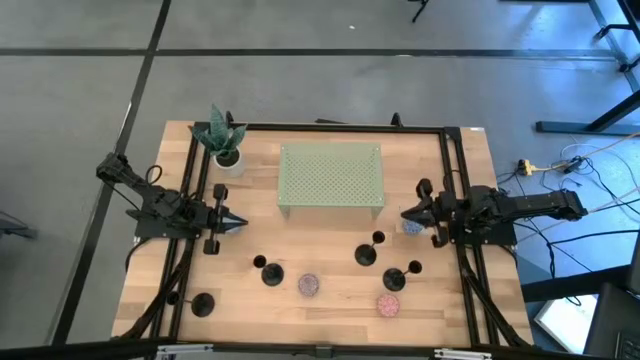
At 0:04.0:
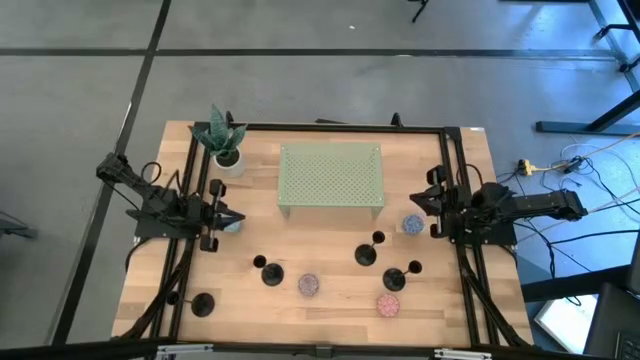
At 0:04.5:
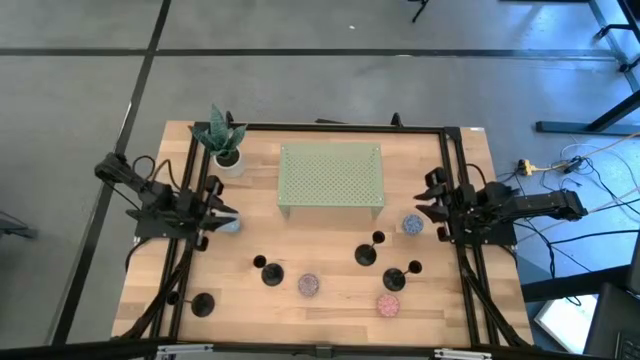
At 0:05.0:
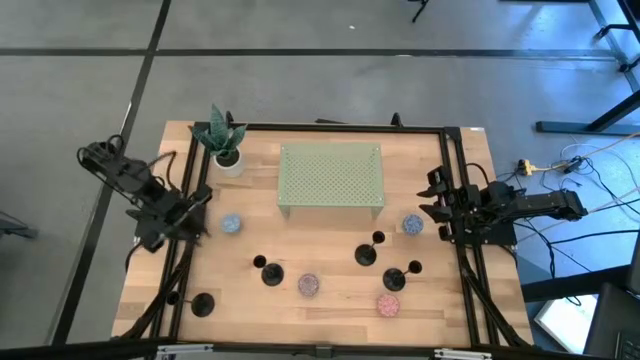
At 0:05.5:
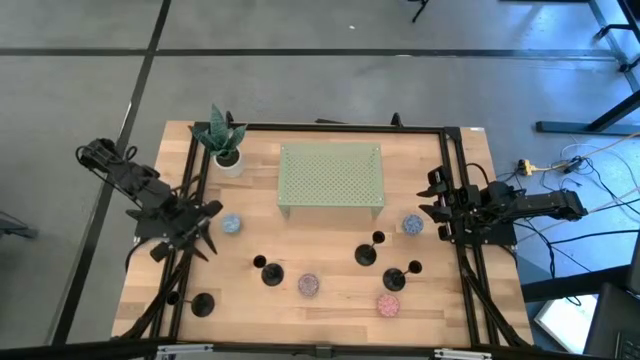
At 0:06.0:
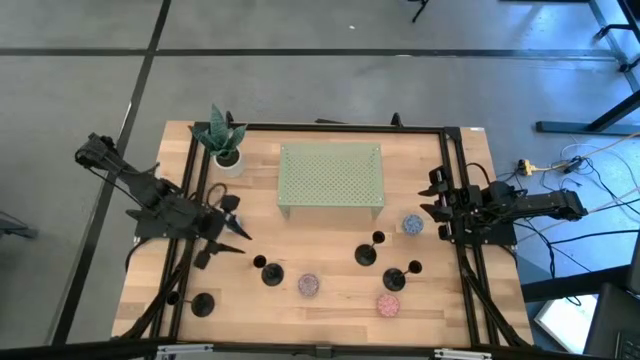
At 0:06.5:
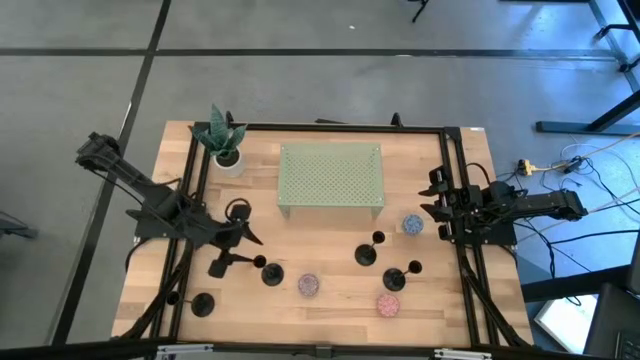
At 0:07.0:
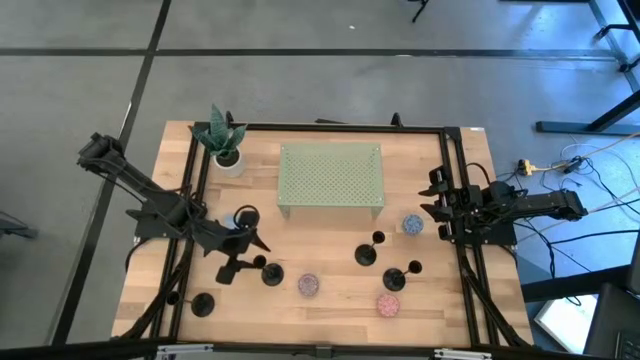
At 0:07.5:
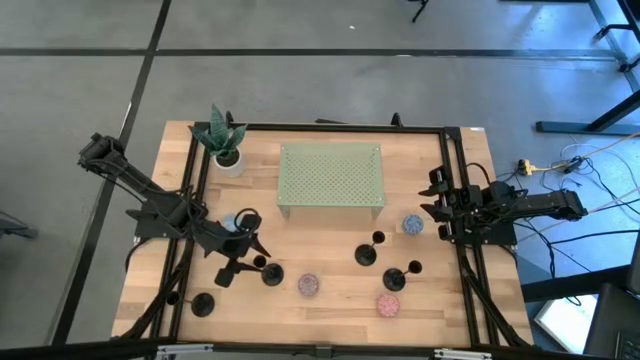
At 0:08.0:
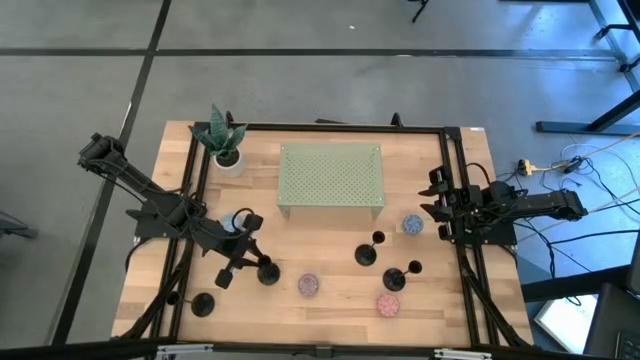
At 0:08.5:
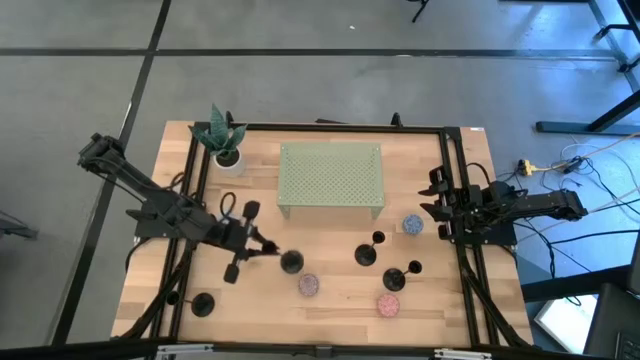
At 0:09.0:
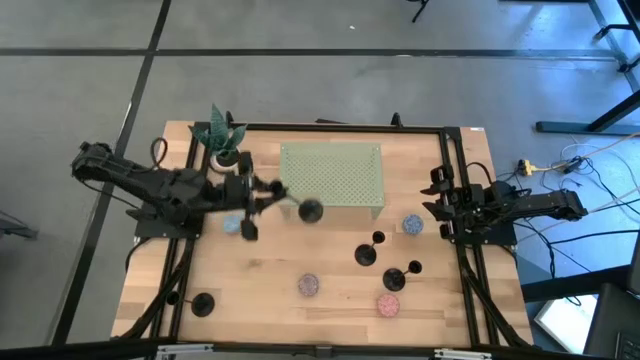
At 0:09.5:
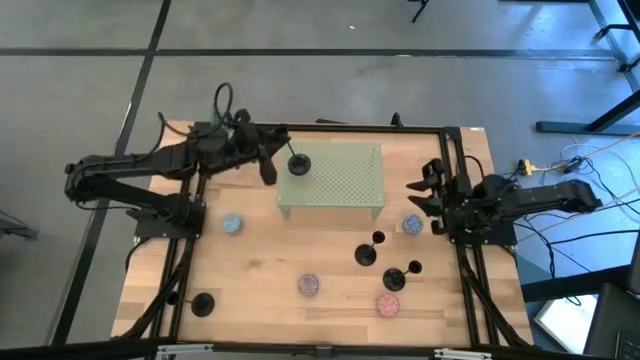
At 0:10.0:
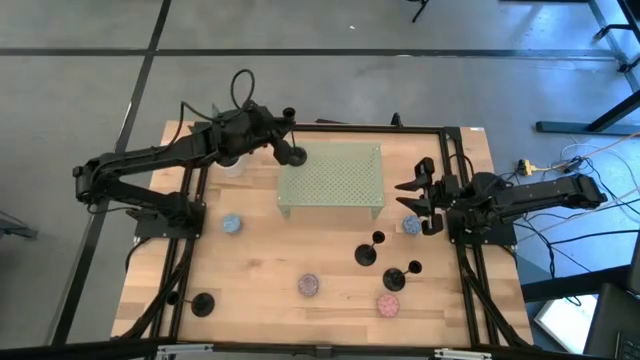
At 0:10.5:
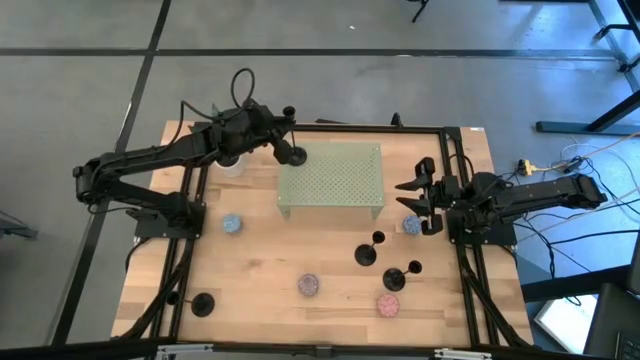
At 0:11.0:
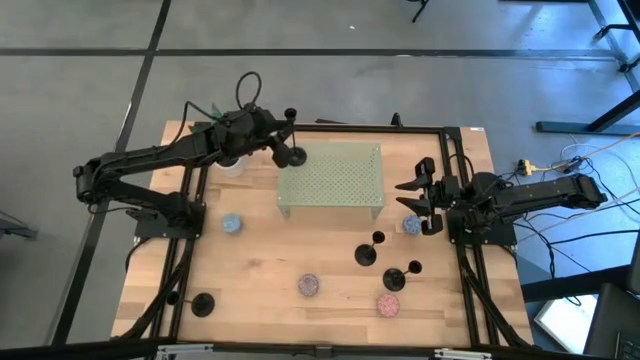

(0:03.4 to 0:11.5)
Task: Pick & Place candle stick holders
Put the black candle holder on the shelf

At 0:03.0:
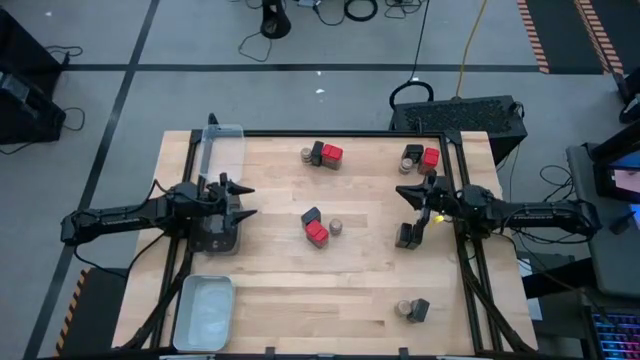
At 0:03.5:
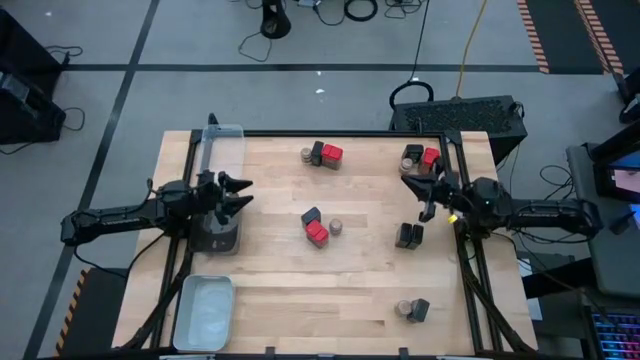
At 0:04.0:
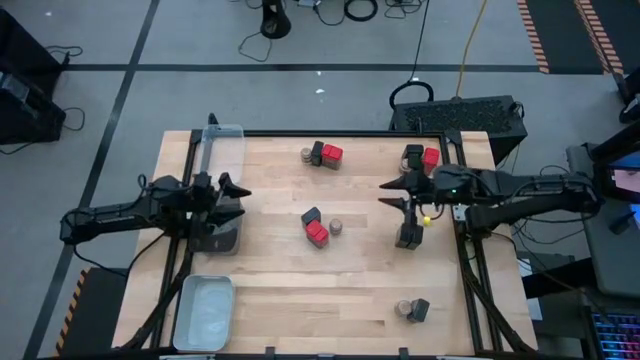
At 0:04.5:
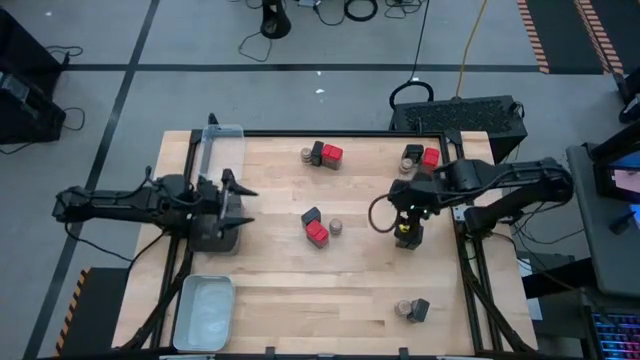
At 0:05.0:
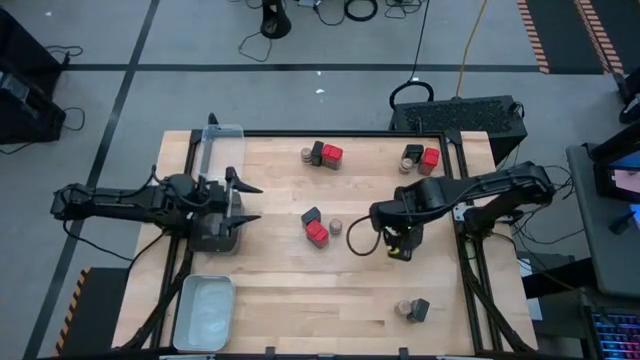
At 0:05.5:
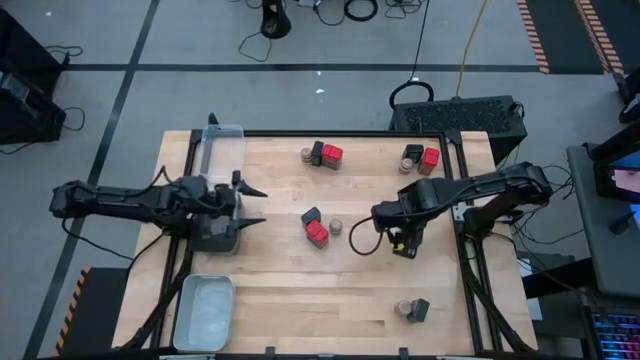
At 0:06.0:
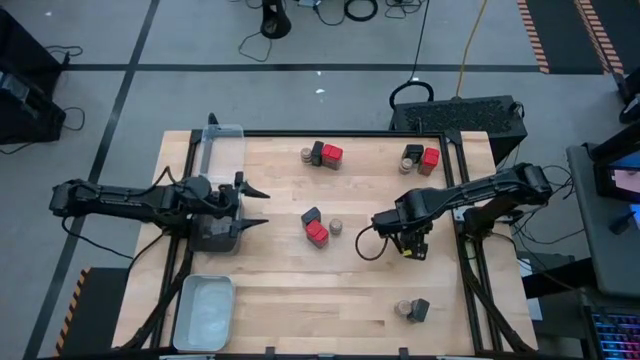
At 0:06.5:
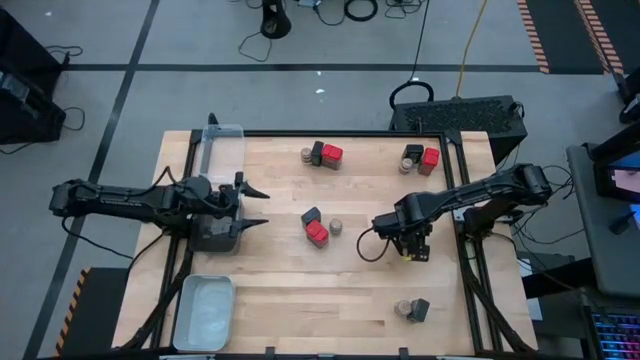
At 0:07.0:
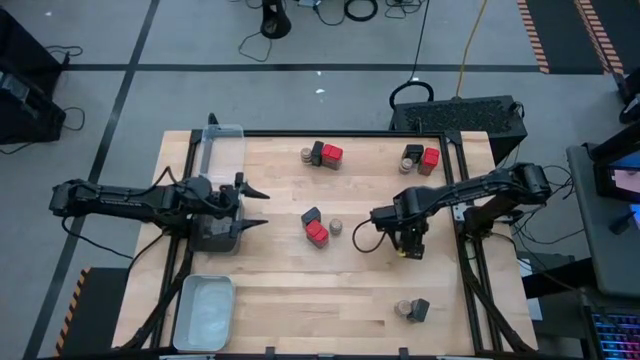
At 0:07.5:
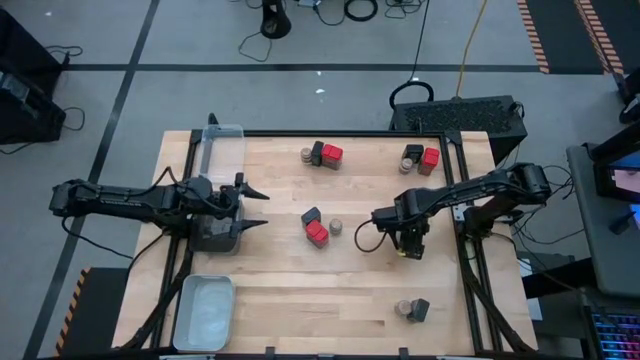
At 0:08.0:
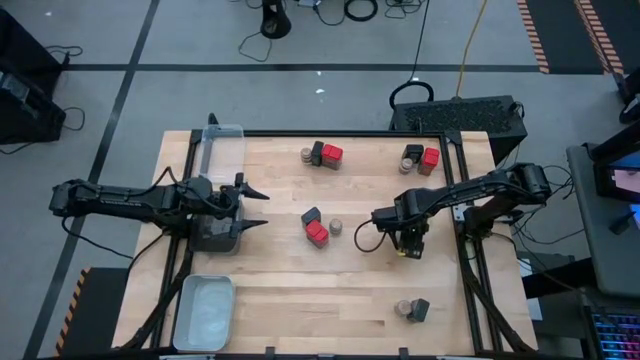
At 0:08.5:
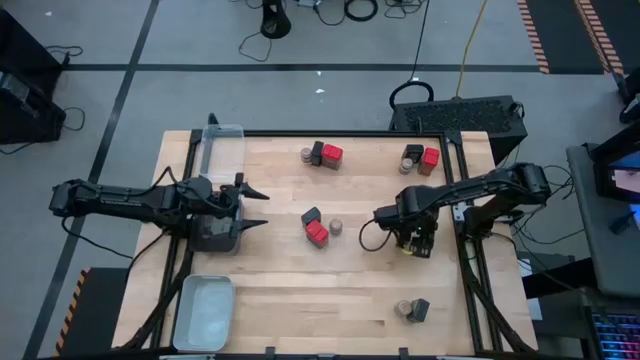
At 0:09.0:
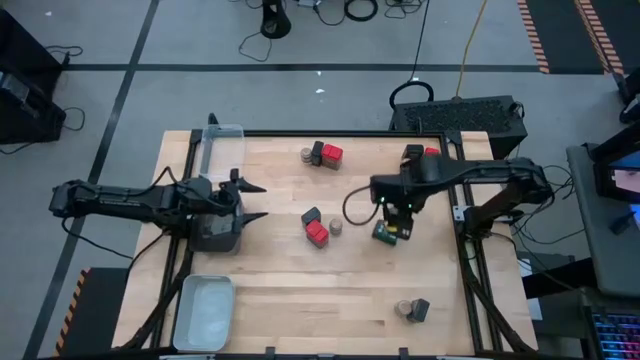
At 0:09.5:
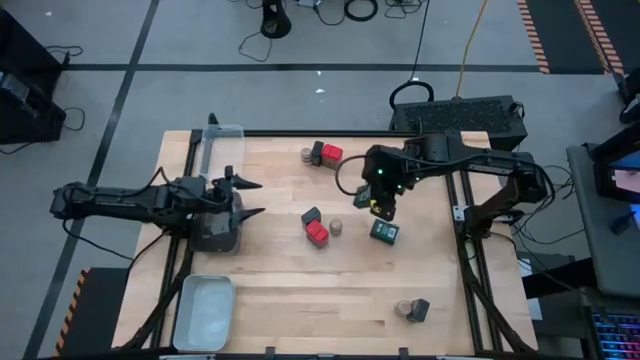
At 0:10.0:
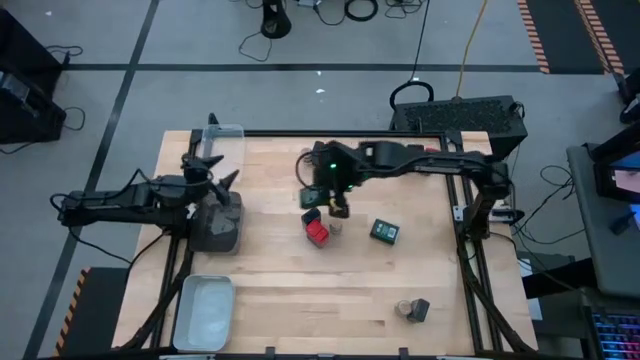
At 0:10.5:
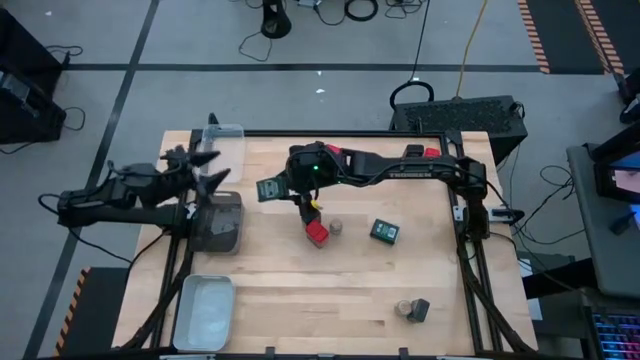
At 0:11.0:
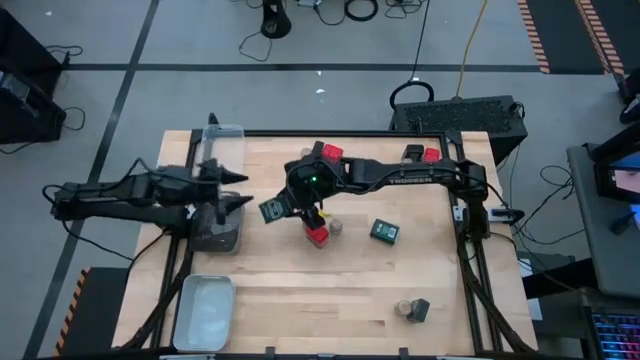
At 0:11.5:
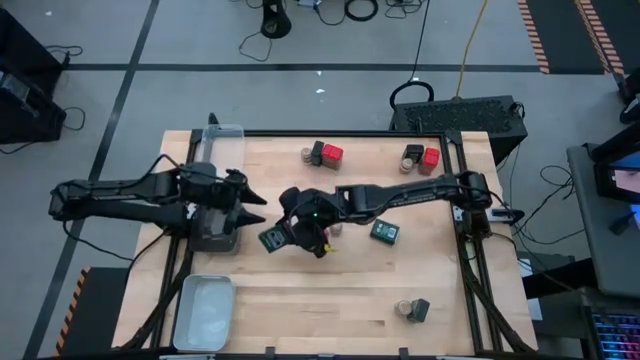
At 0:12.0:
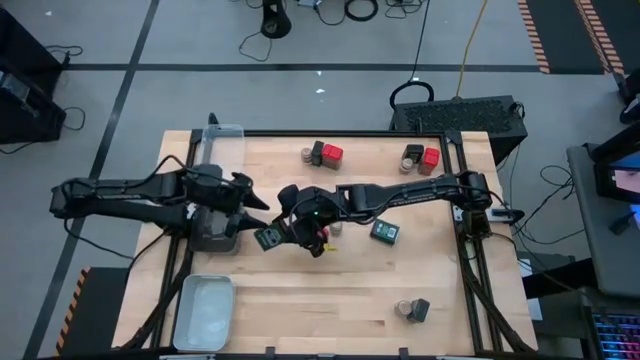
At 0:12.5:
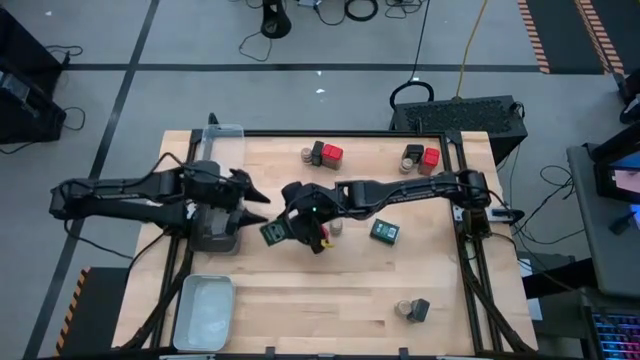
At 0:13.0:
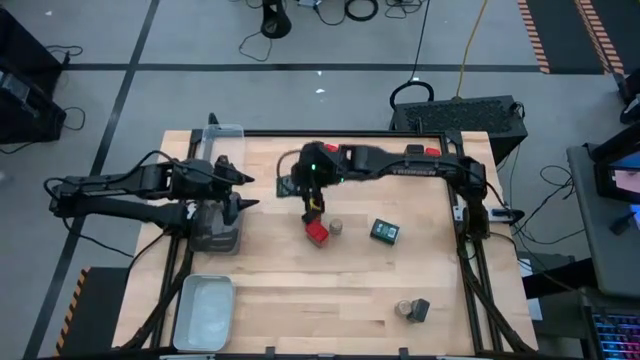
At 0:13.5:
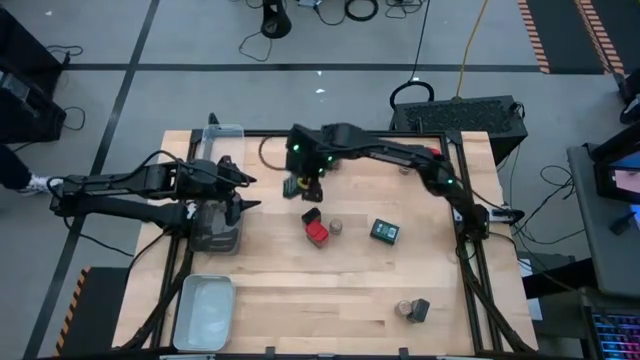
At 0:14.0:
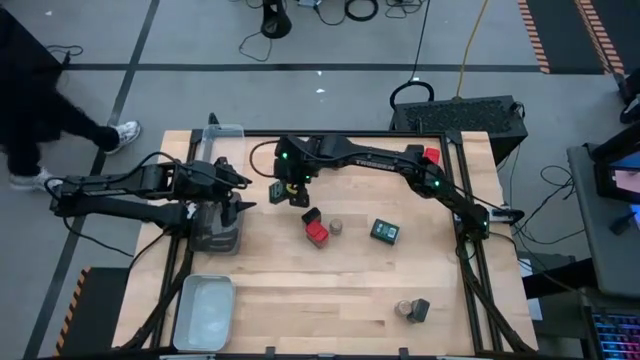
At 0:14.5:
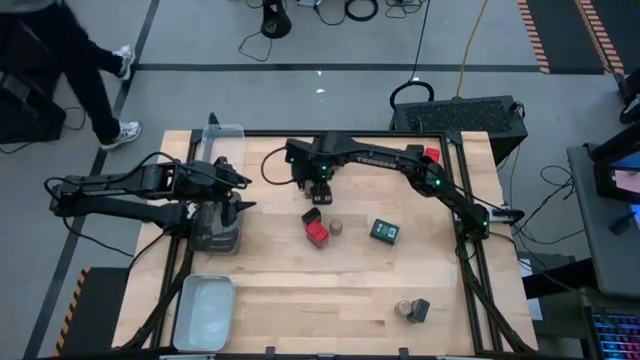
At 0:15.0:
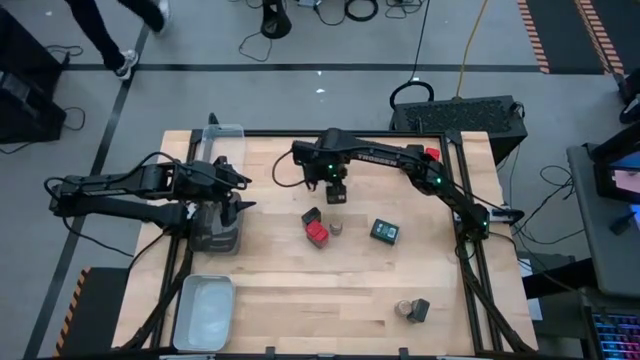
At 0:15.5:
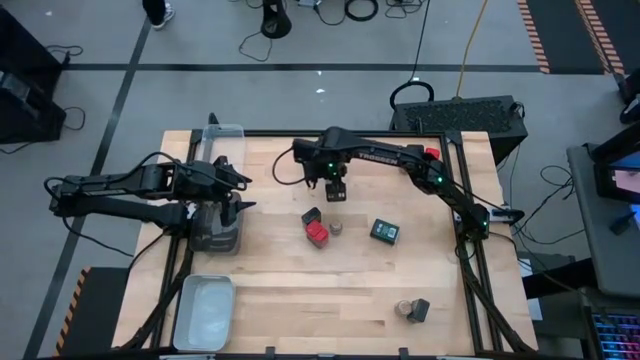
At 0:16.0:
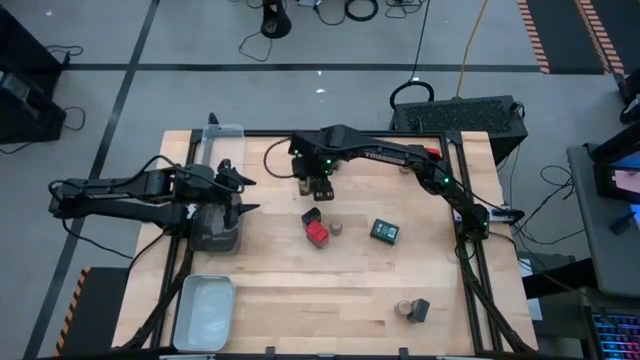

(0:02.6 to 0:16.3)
Task: Sort spices by type
Put the black seasoning can into the black bin
